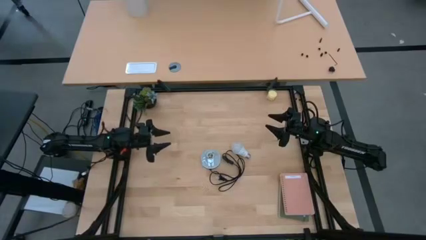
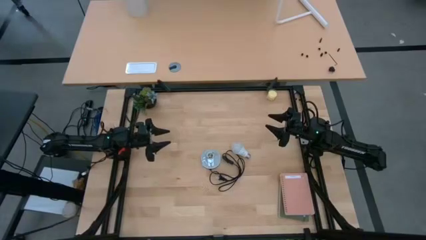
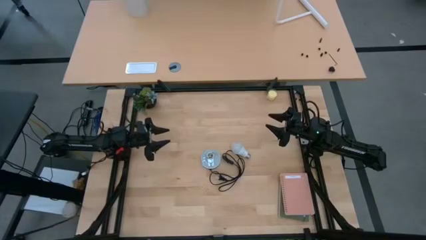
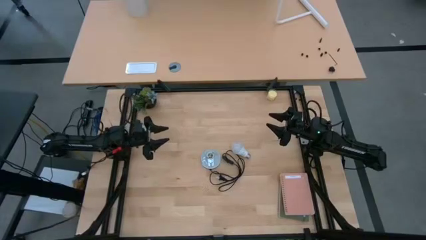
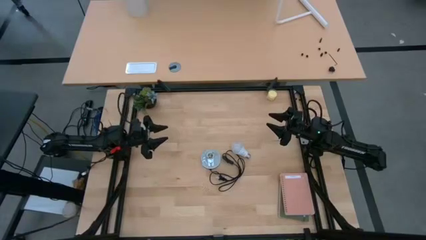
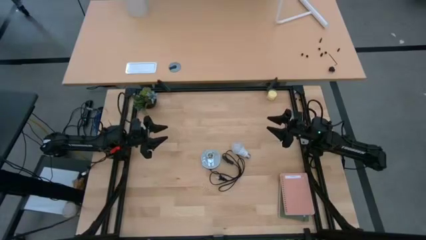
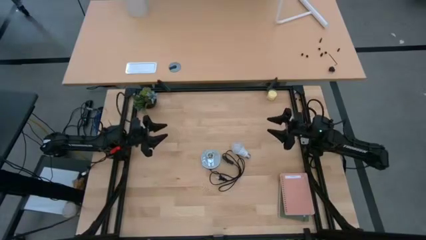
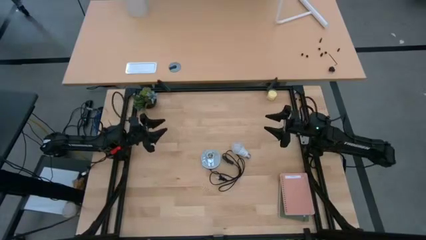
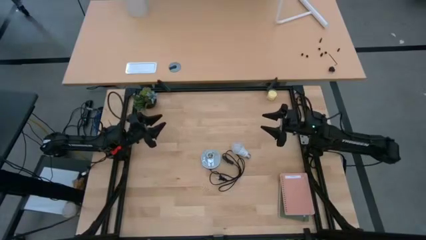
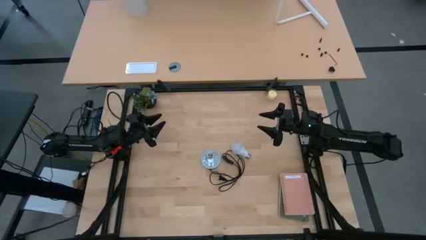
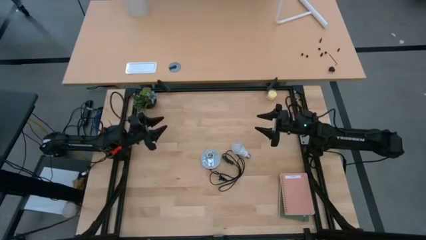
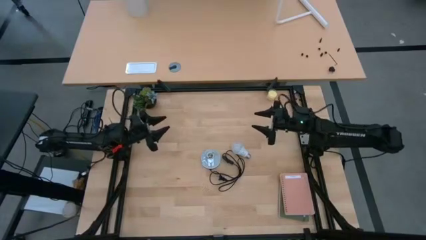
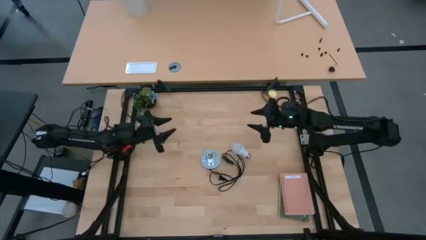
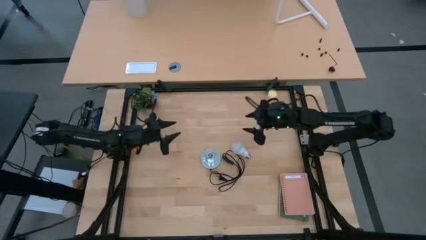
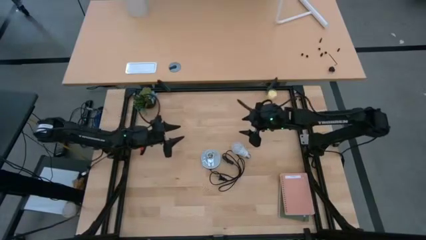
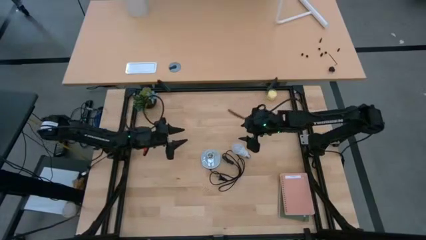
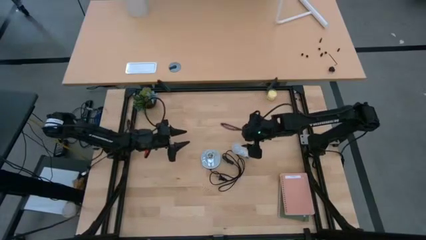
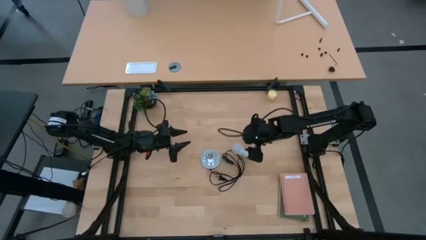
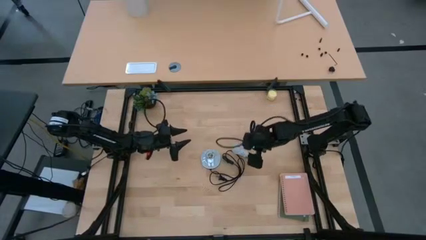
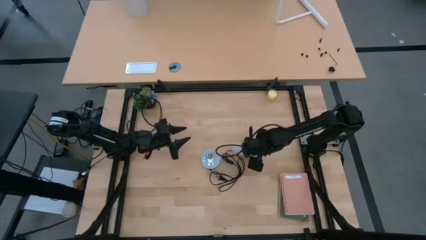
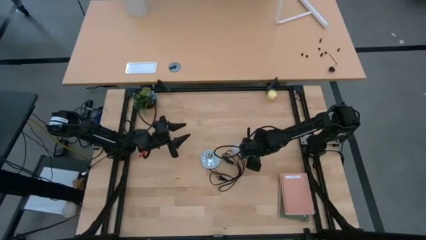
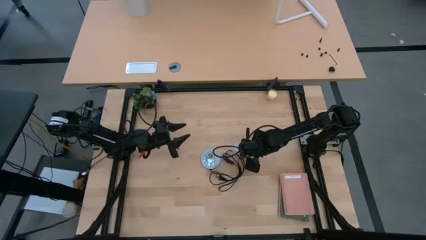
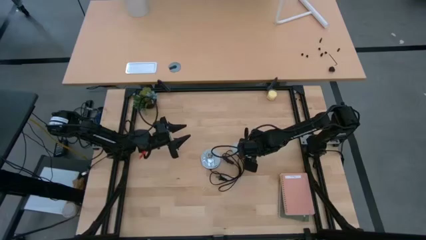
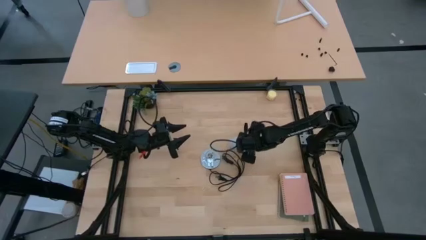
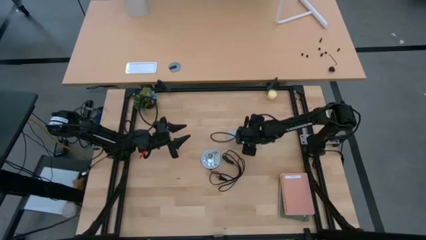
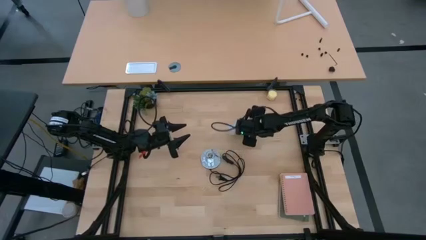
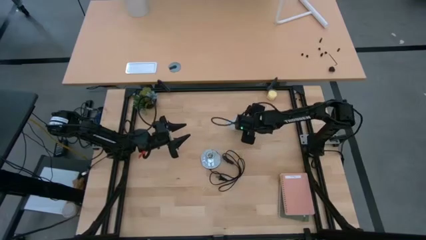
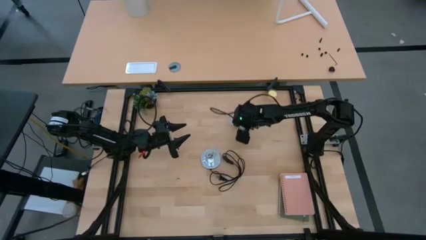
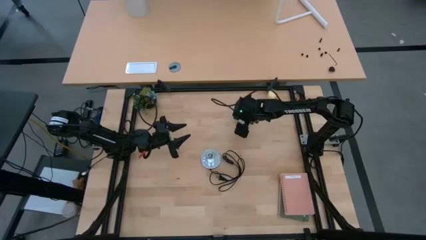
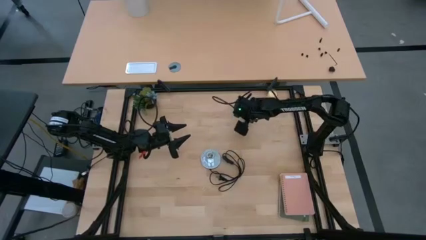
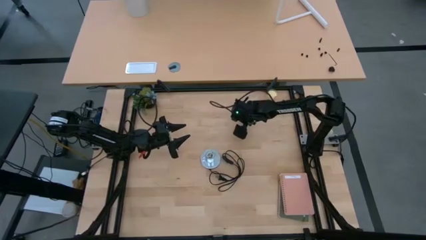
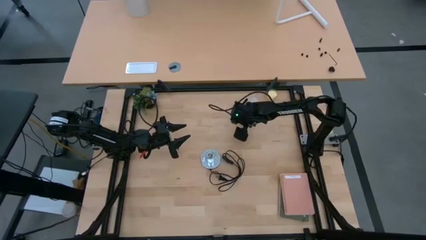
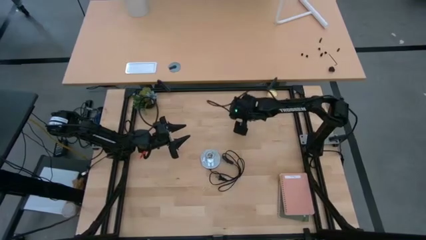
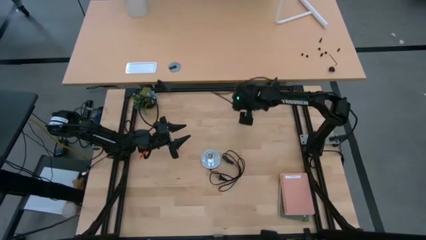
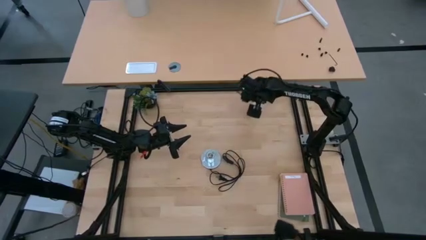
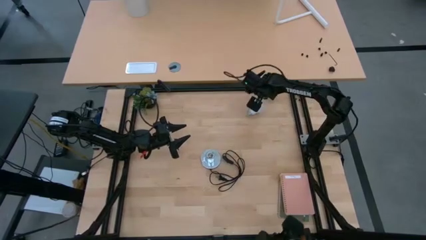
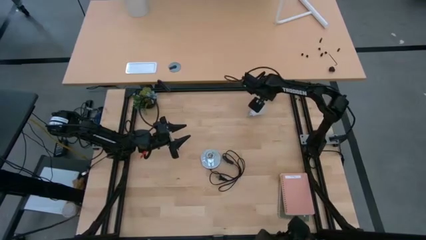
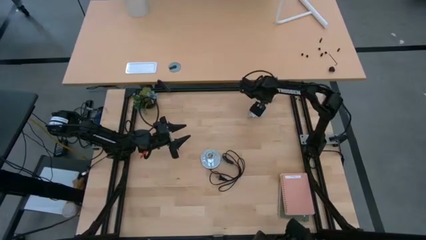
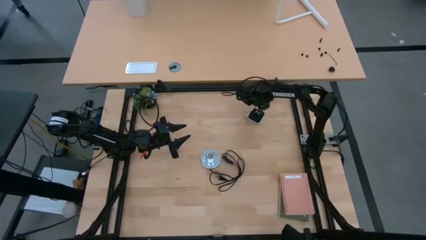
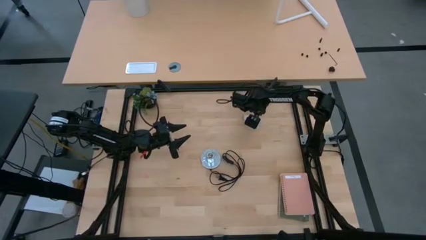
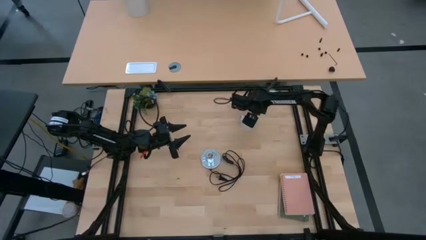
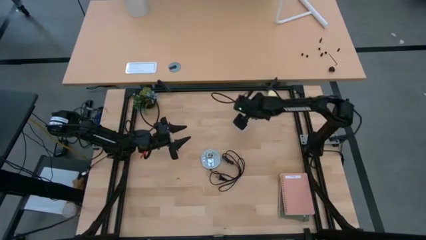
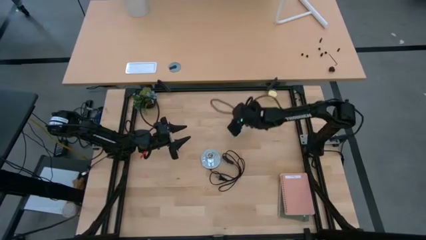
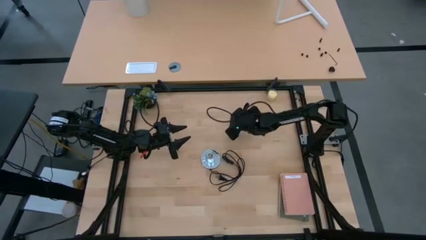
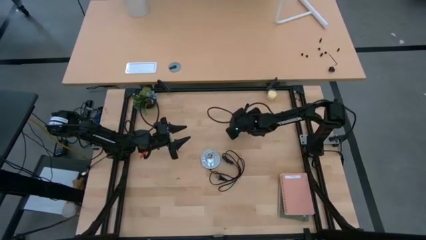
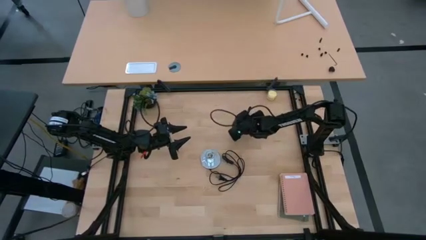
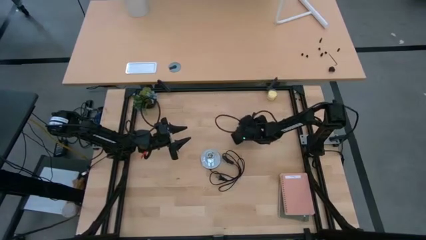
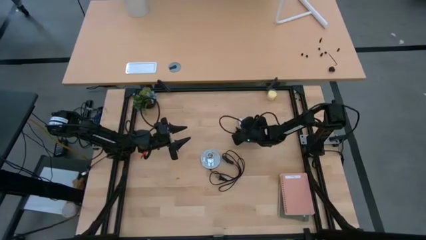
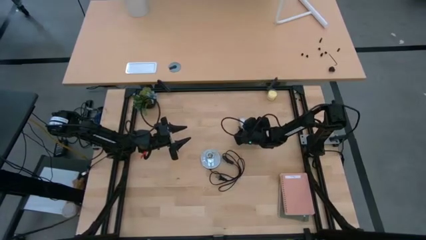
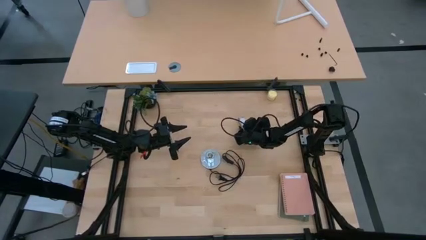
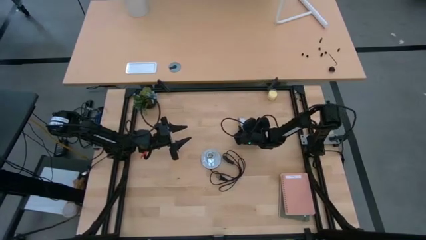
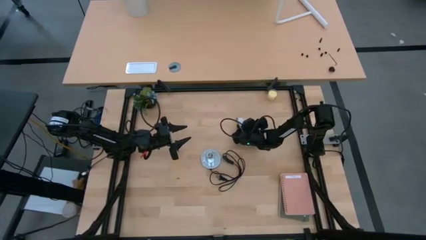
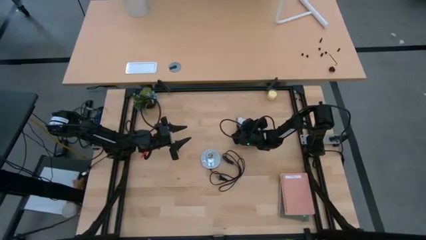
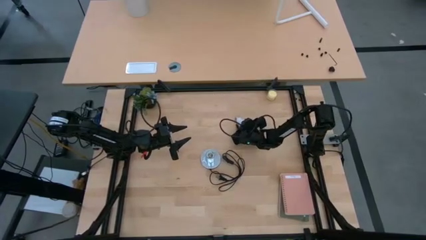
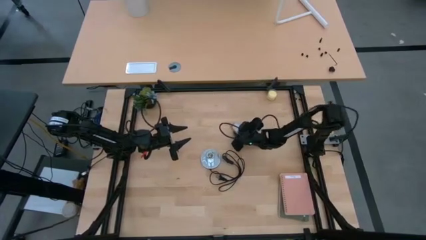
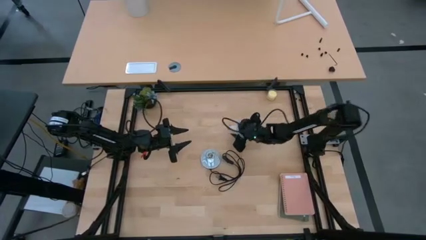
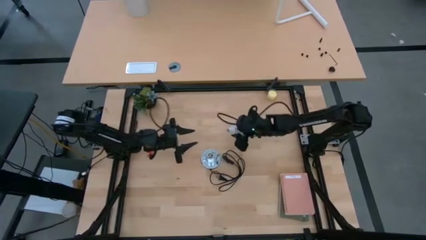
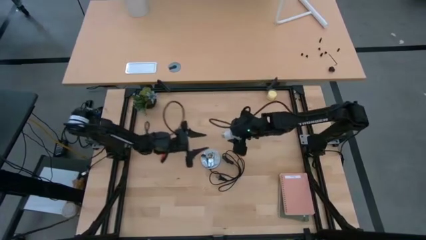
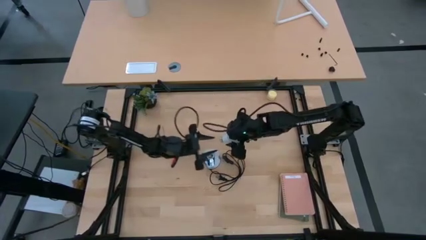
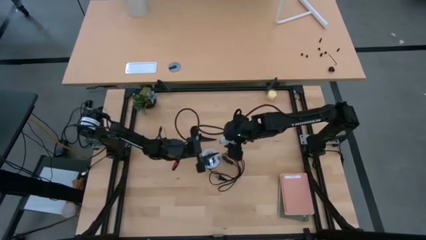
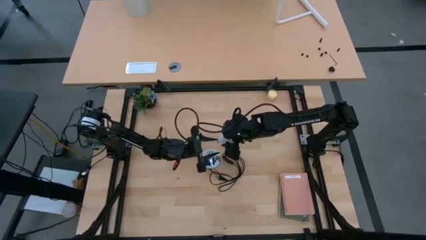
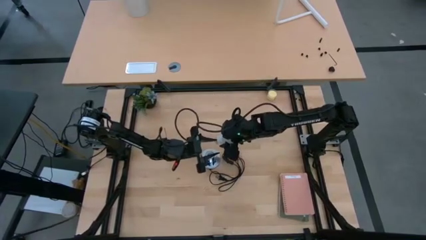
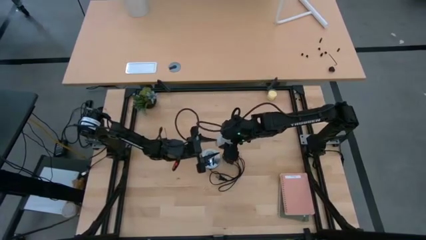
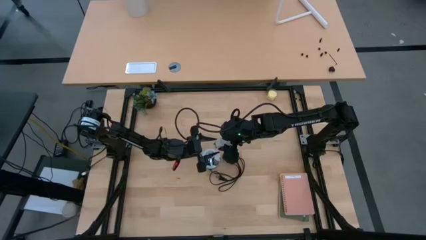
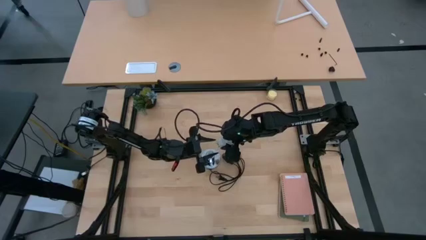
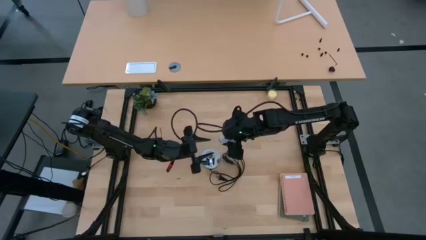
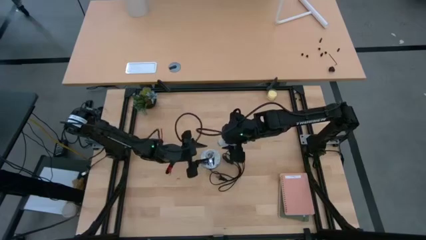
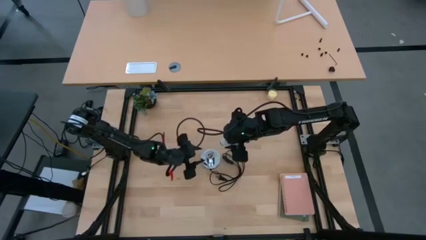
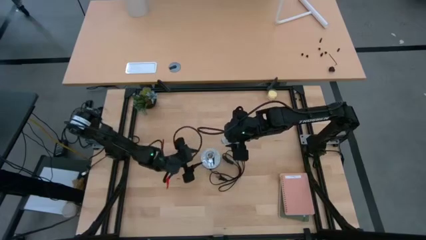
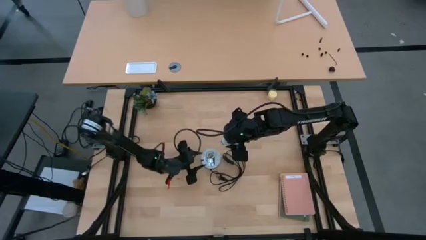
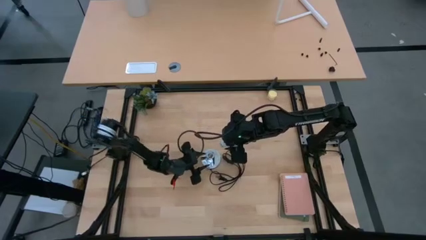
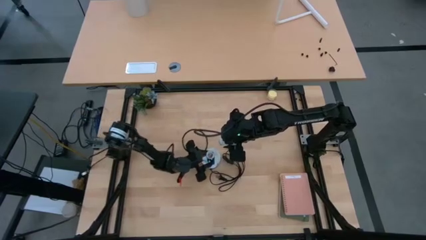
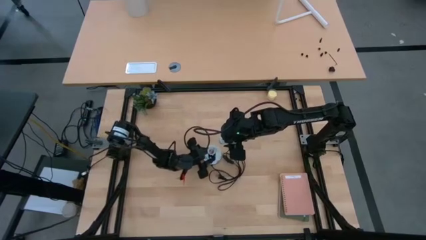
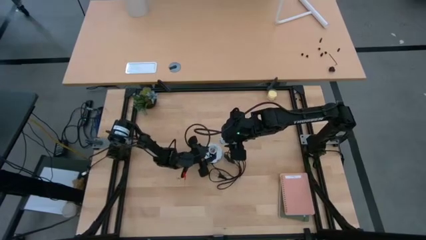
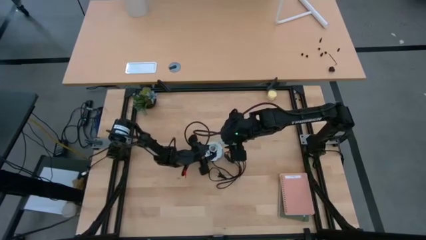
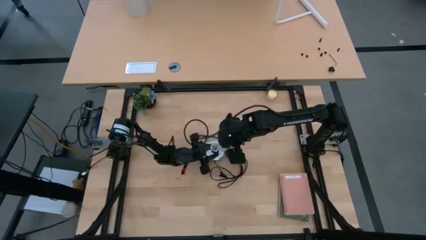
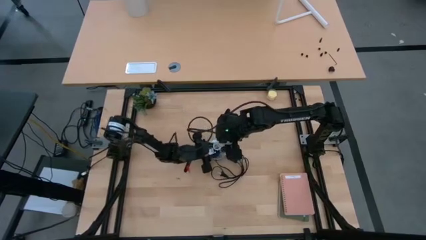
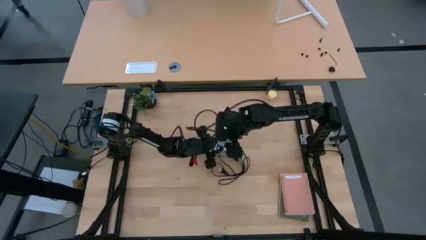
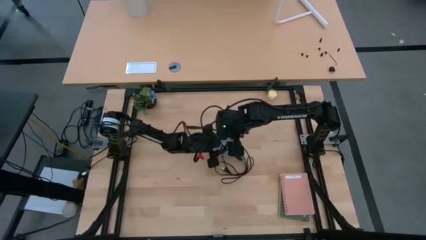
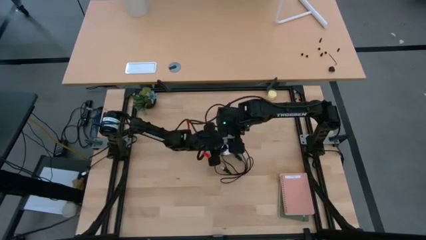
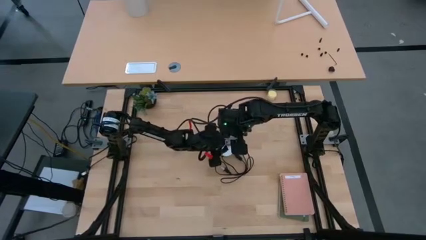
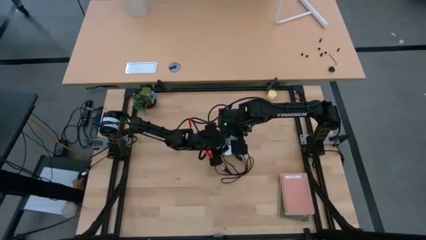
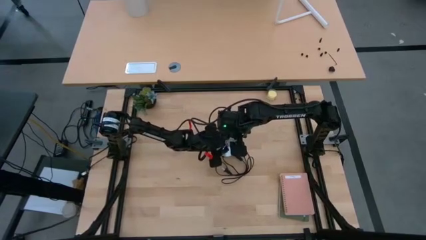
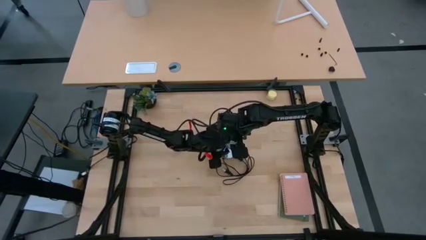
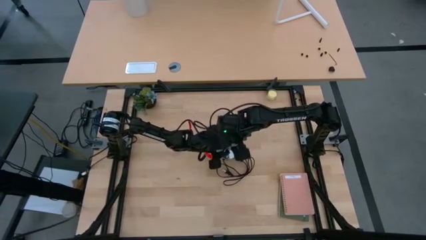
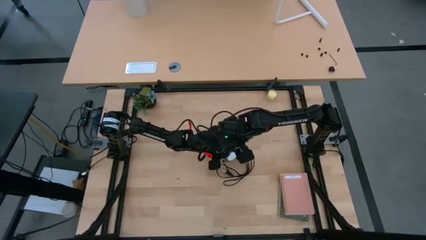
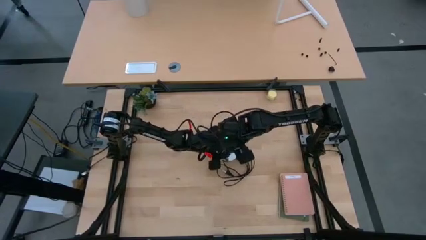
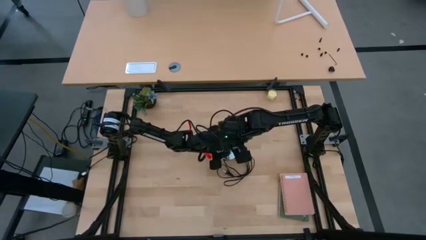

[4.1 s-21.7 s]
Task: Screw lightbulb
Insert the lightbulb into the lamp
